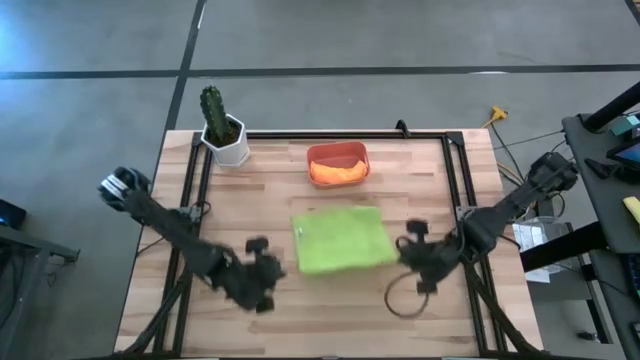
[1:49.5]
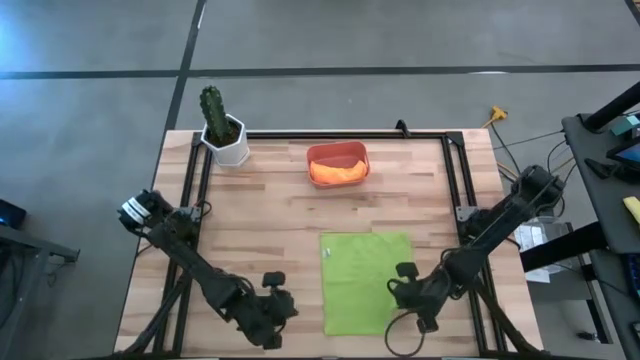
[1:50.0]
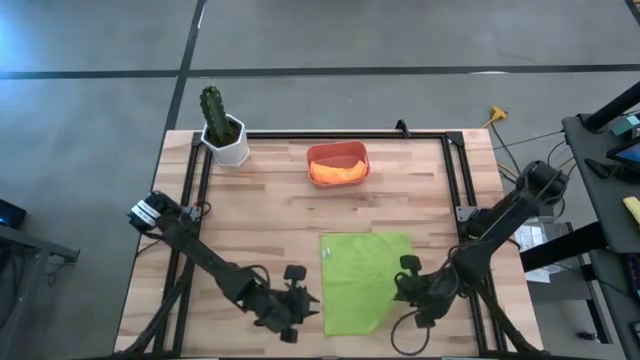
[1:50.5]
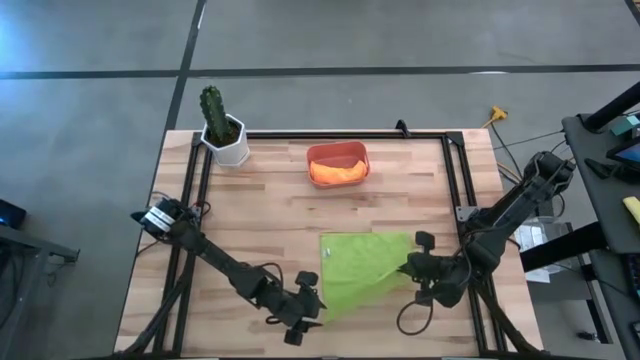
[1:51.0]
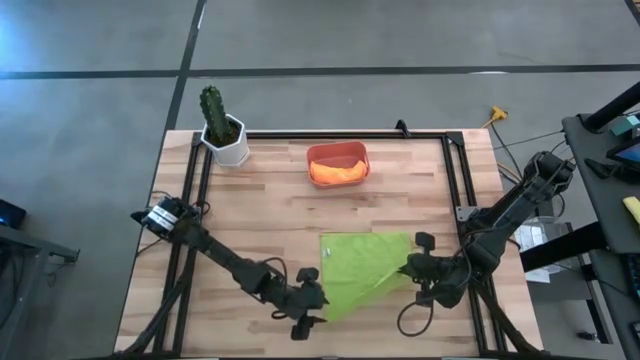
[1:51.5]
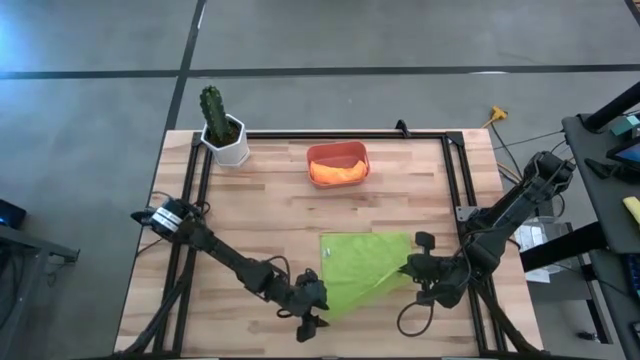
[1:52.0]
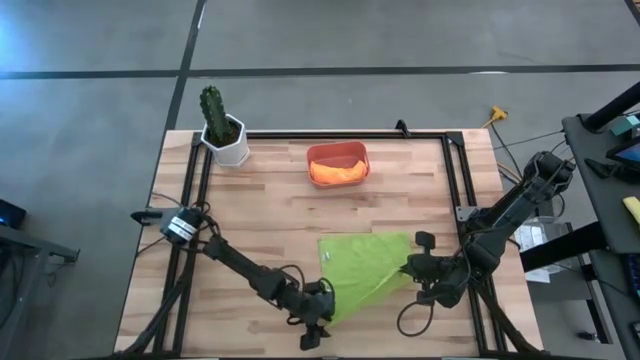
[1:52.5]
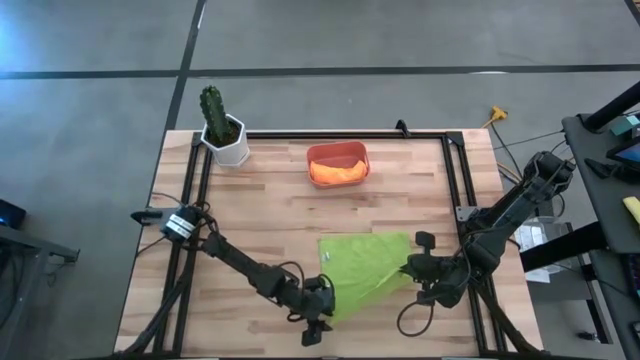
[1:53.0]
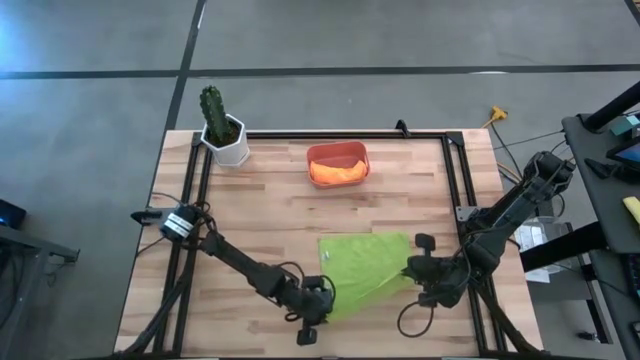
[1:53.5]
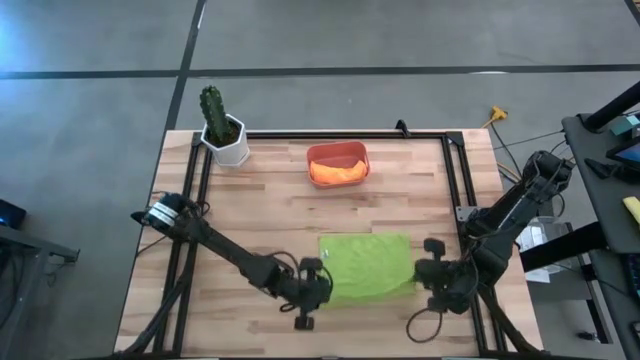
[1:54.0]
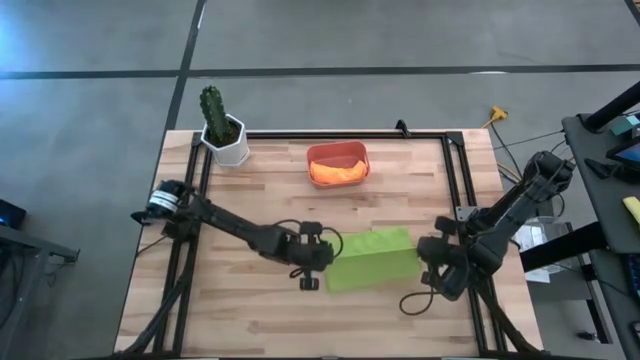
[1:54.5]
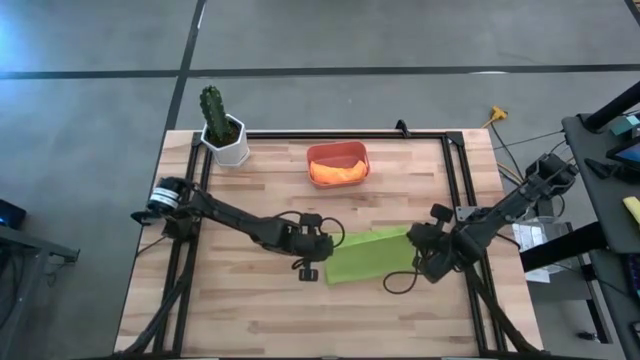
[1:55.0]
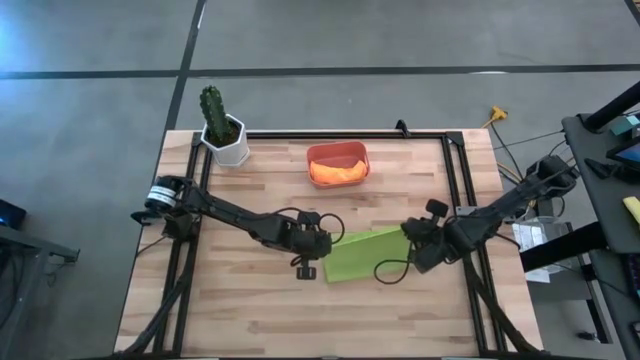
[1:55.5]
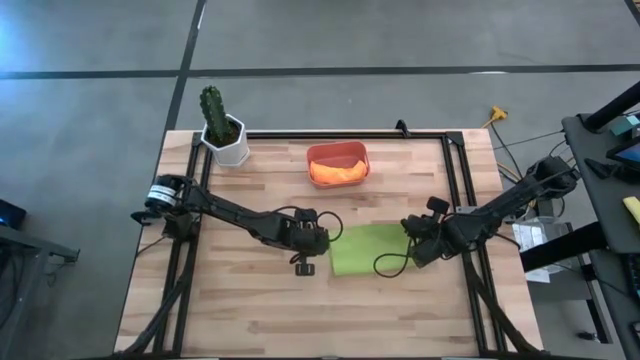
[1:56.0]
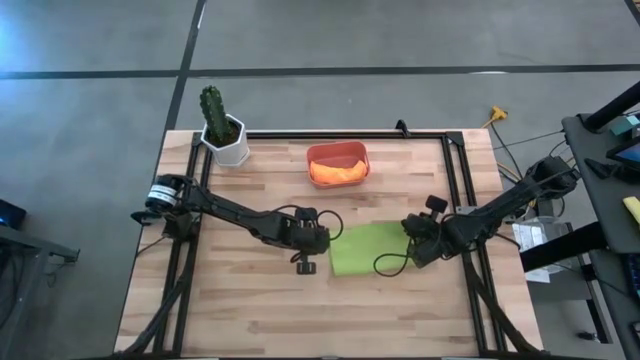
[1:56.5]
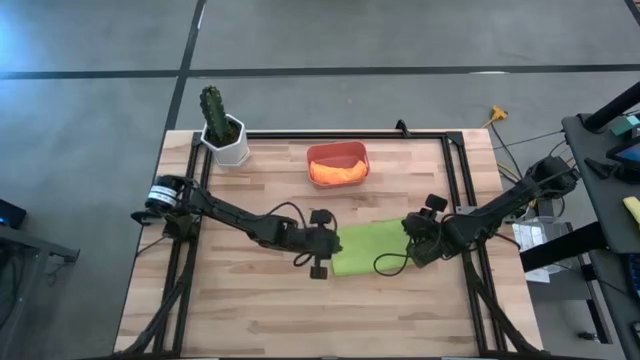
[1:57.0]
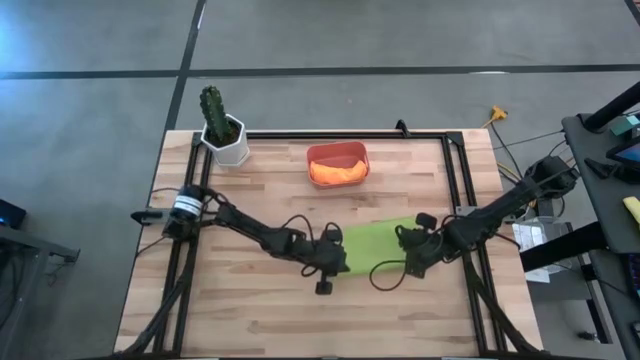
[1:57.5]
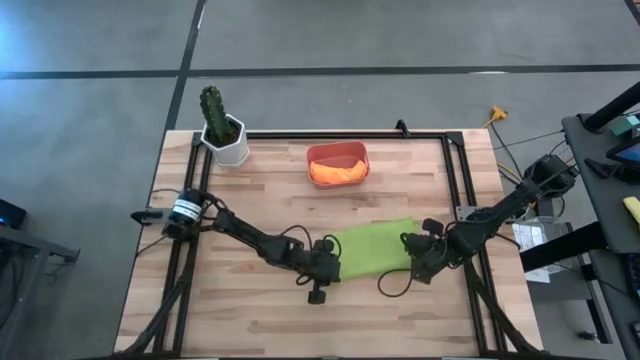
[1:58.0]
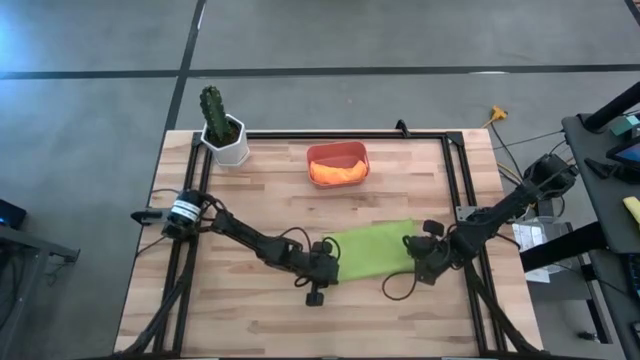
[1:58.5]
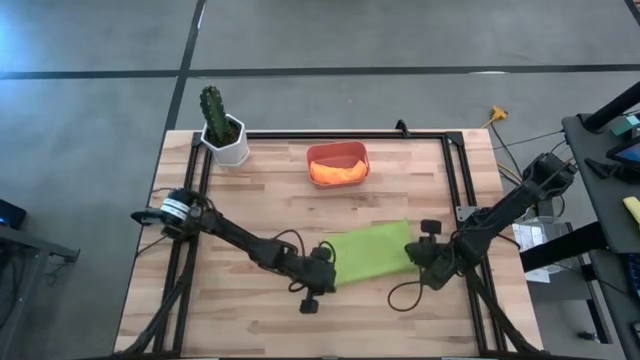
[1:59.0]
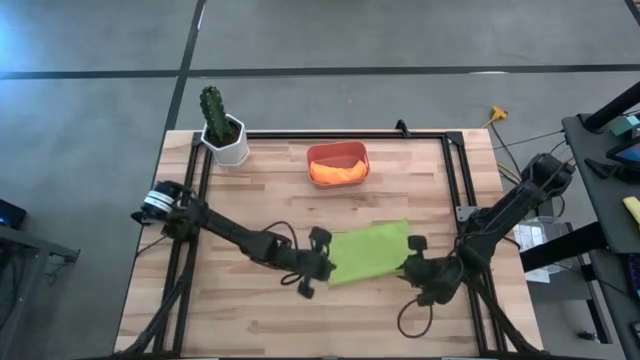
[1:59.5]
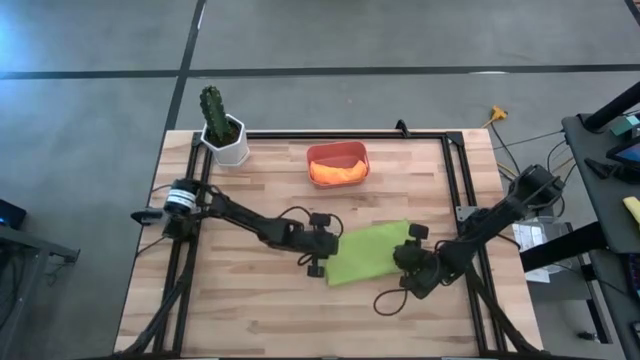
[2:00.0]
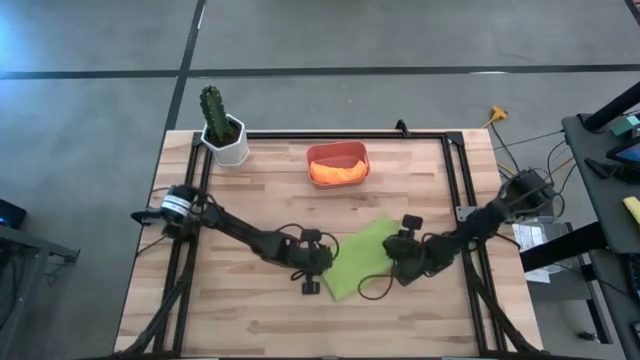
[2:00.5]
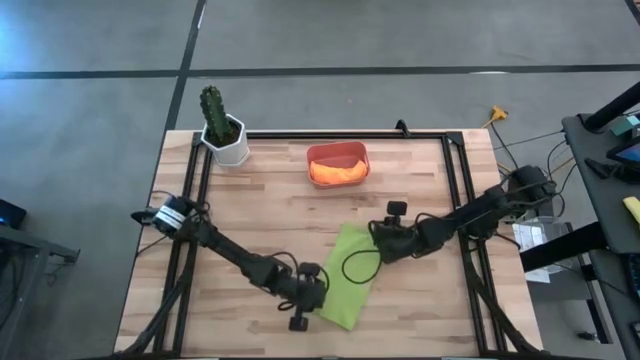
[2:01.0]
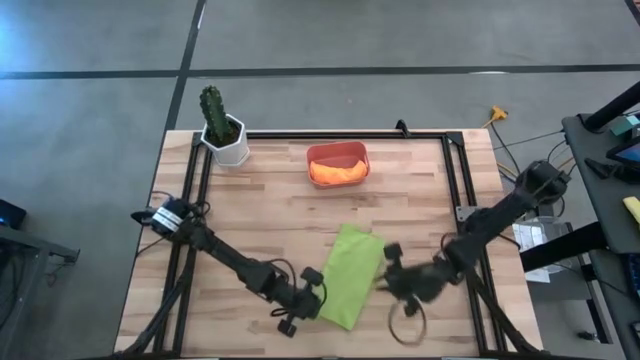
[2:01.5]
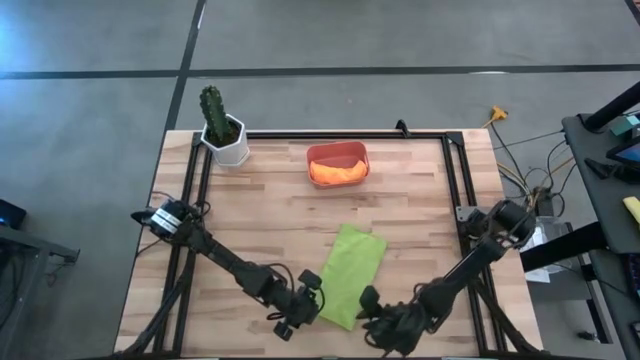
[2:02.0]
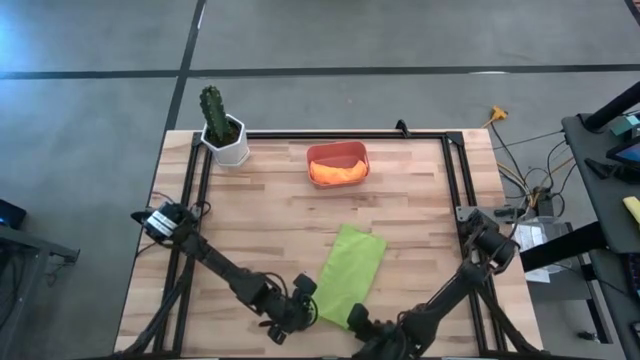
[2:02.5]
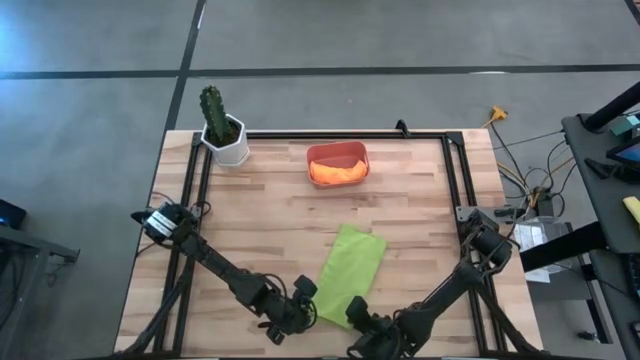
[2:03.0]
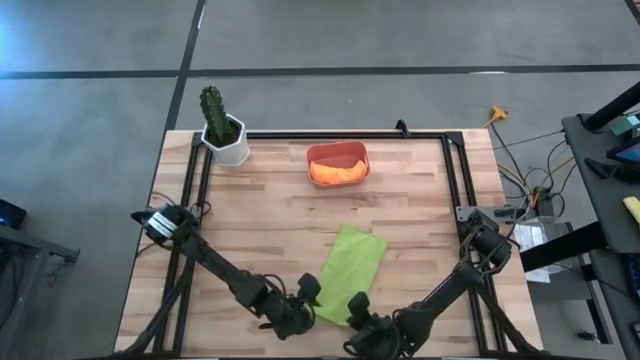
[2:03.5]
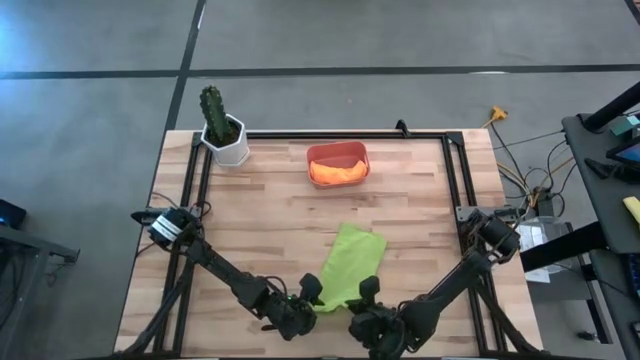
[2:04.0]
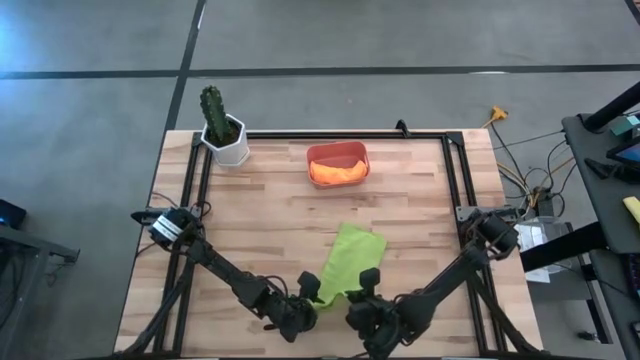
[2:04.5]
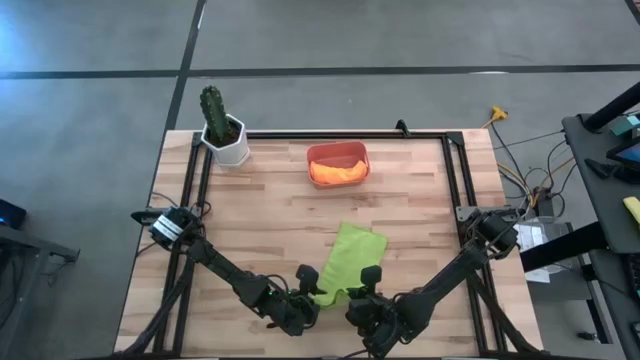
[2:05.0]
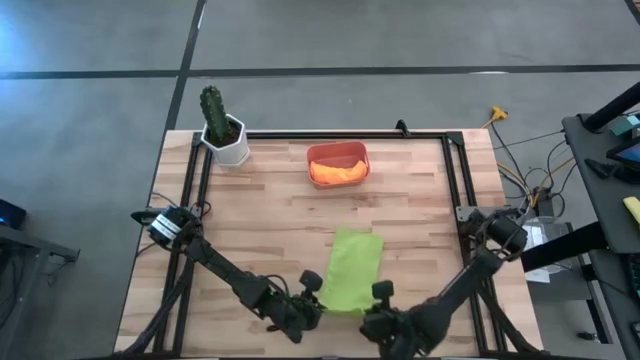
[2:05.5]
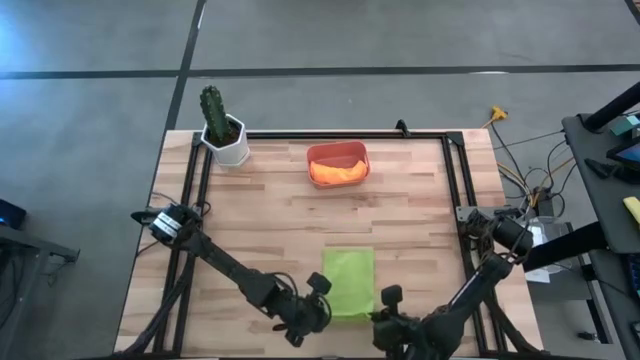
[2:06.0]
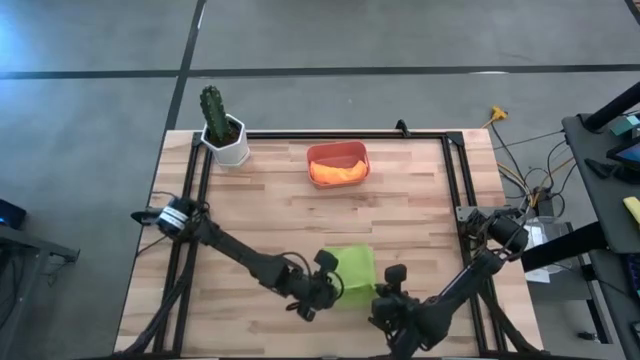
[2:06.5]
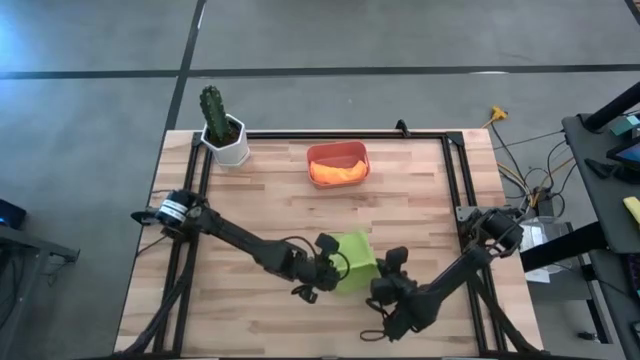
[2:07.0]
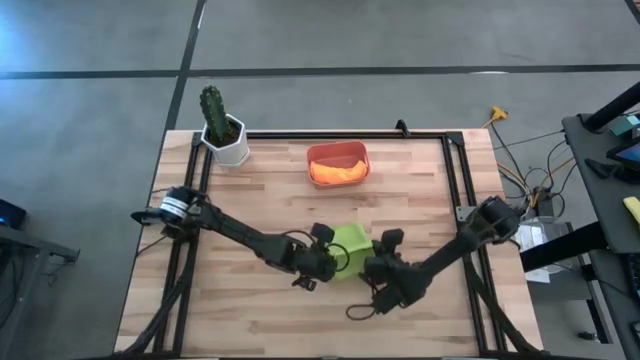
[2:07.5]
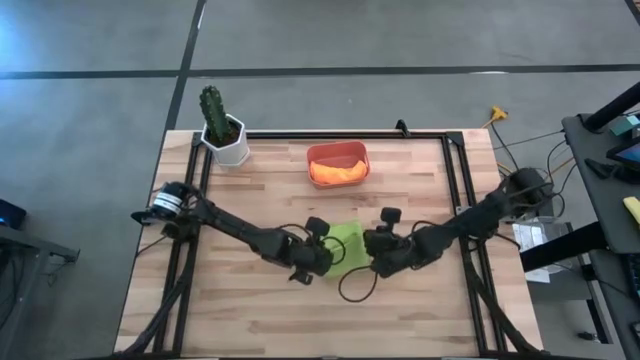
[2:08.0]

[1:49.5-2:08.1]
Task: Roll microfiber towels into tight, uniform cylinder then place into a basket
Fold the green microfiber cloth

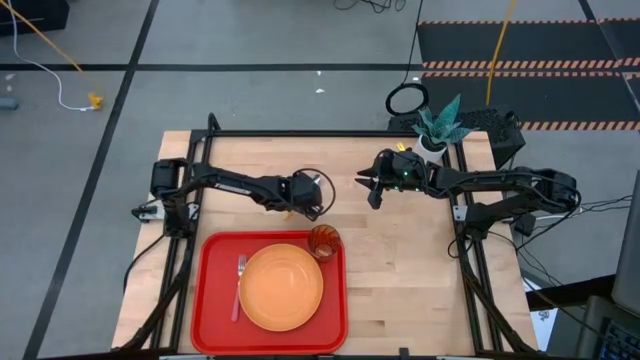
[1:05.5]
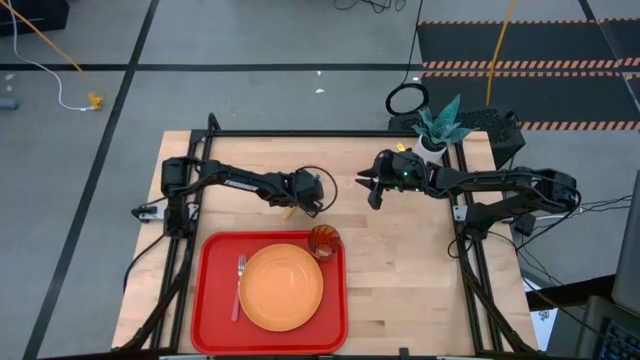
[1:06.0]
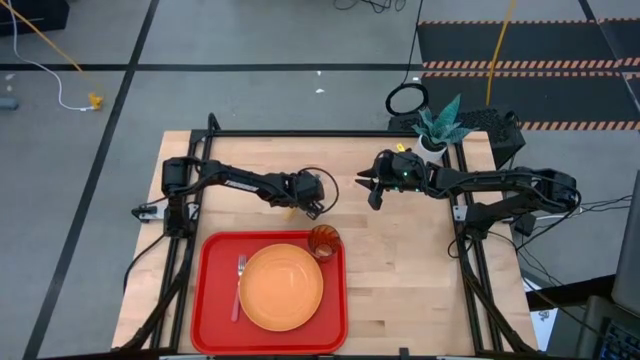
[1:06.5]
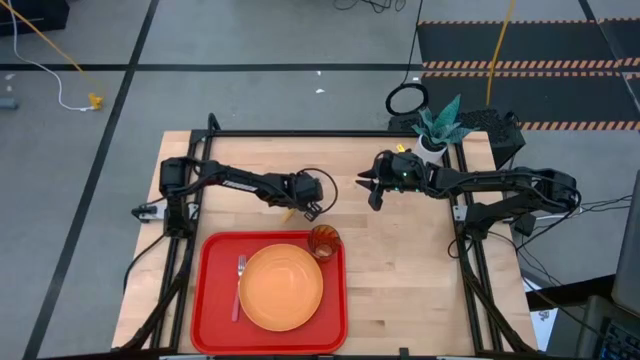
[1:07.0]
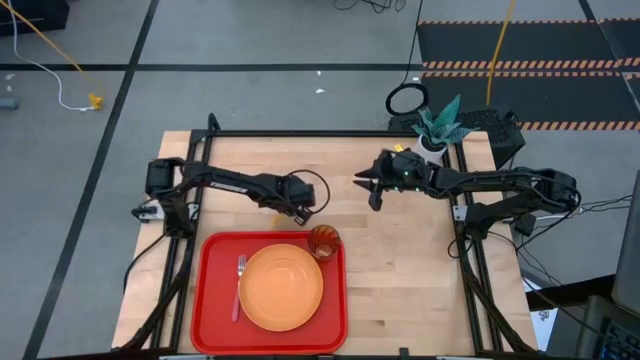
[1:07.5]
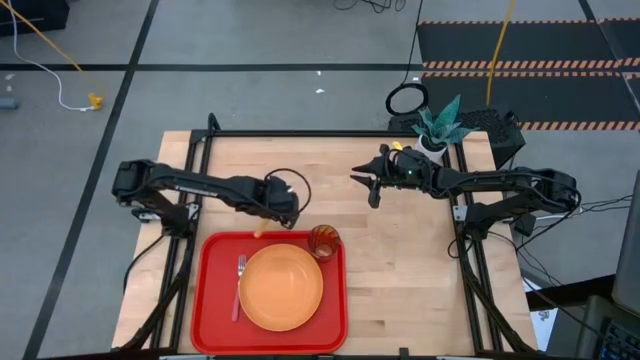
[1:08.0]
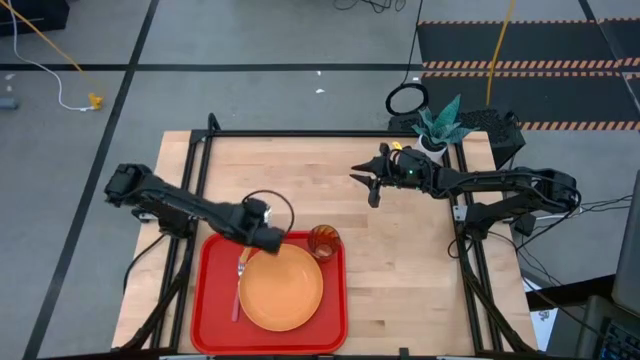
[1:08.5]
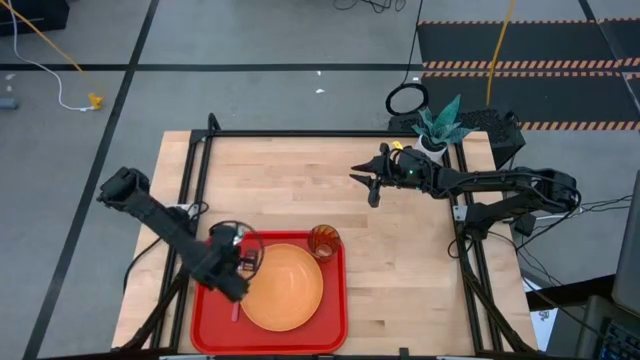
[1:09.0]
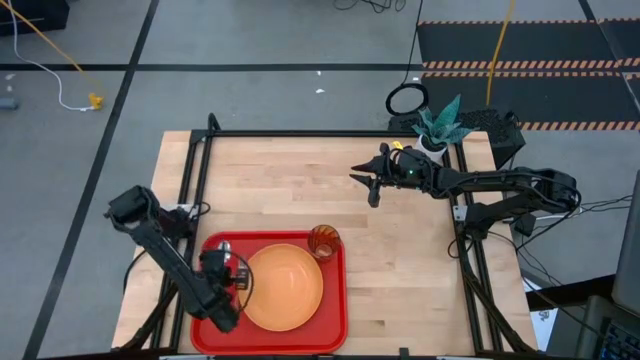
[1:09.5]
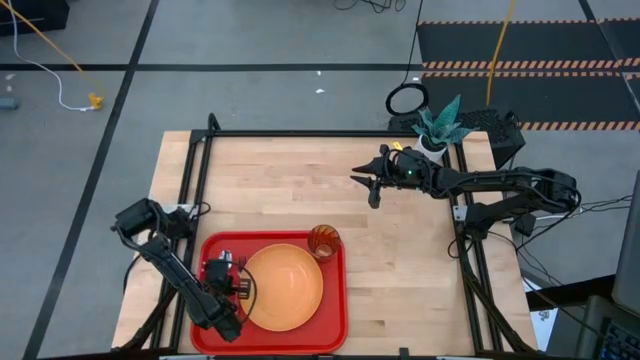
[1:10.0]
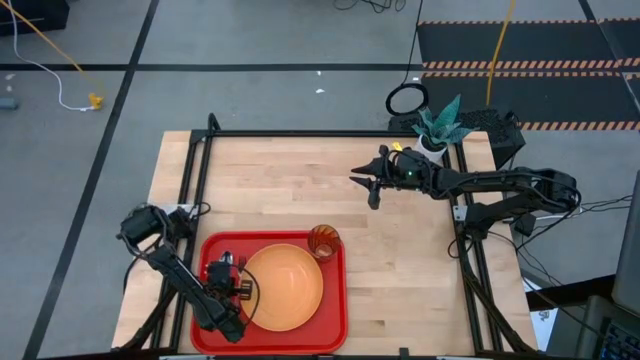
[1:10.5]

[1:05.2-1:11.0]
Task: Pick and place plate/cup/fork/spoon on tray
Put the orange spoon on the red serving tray to the left of the pink fork
